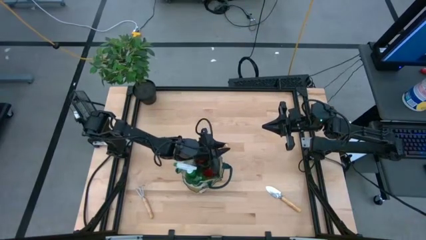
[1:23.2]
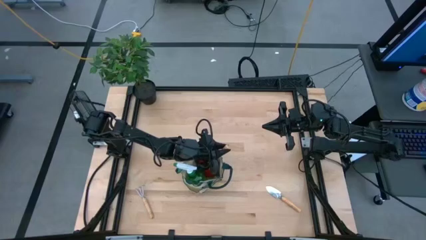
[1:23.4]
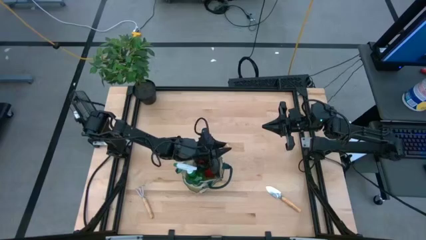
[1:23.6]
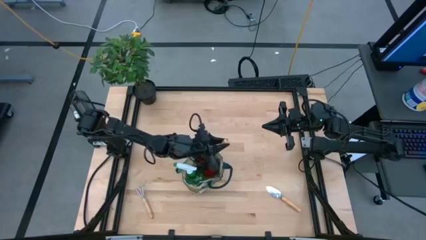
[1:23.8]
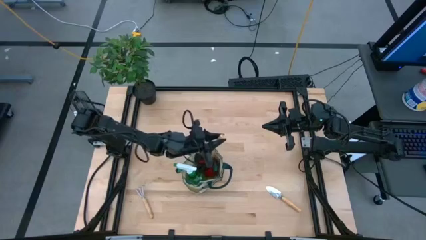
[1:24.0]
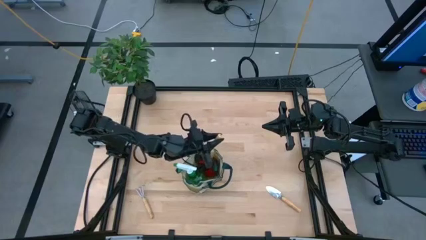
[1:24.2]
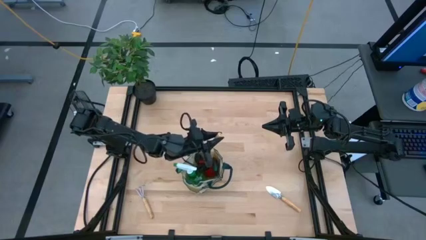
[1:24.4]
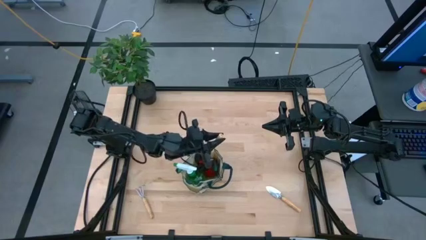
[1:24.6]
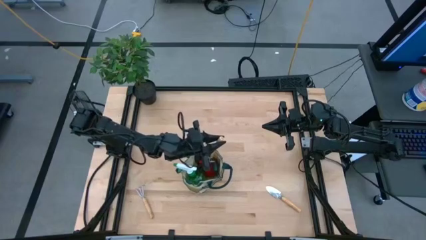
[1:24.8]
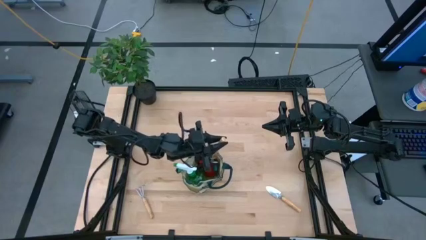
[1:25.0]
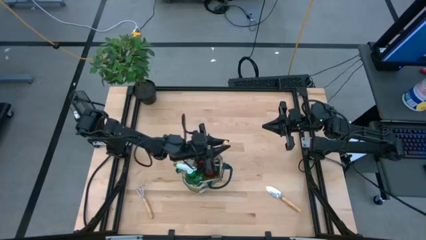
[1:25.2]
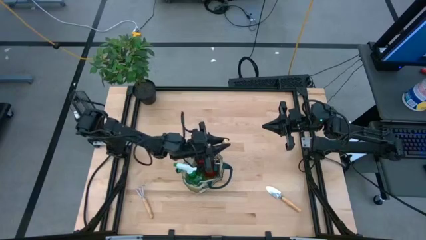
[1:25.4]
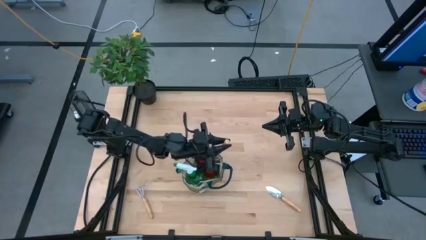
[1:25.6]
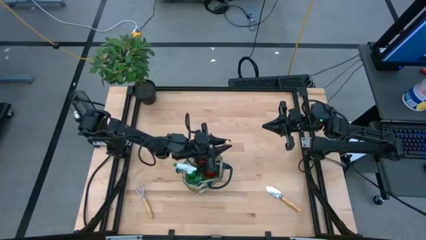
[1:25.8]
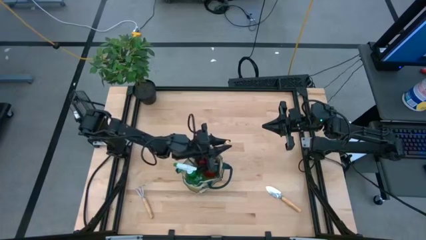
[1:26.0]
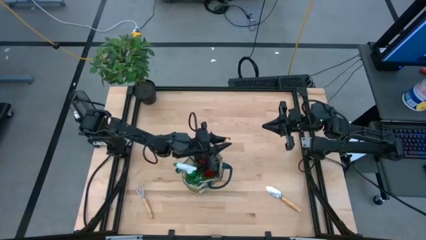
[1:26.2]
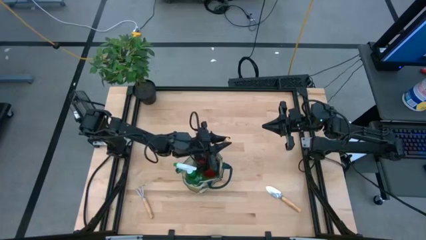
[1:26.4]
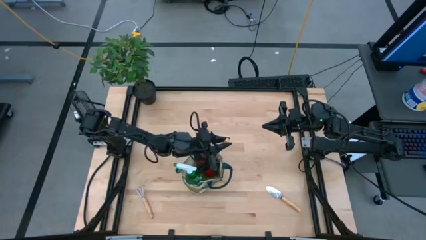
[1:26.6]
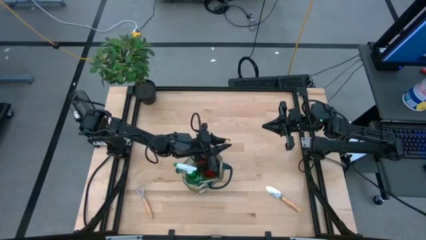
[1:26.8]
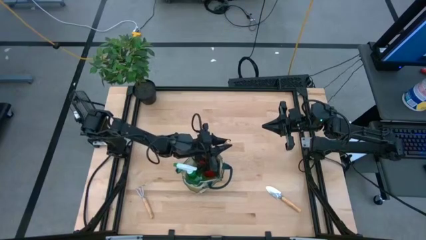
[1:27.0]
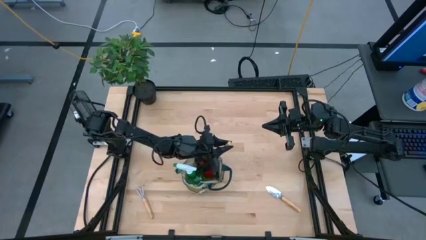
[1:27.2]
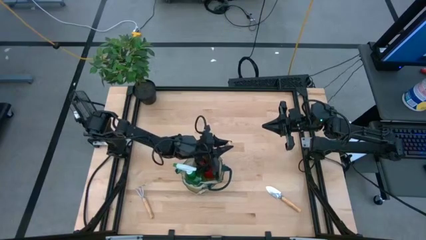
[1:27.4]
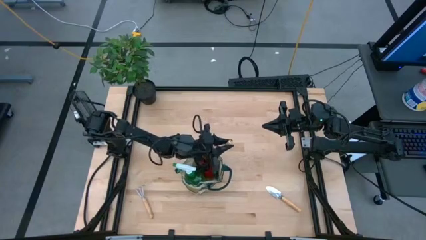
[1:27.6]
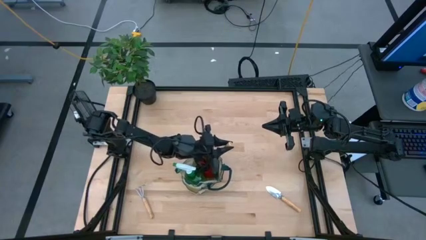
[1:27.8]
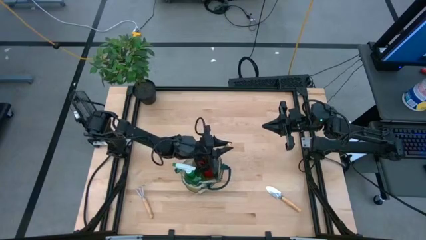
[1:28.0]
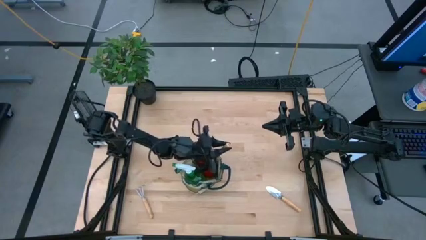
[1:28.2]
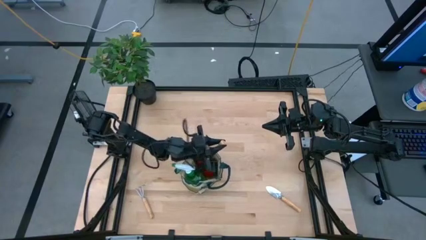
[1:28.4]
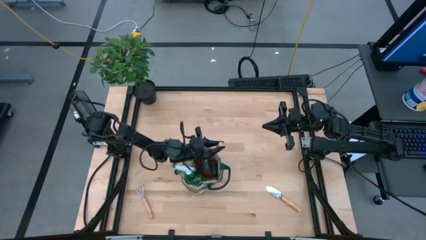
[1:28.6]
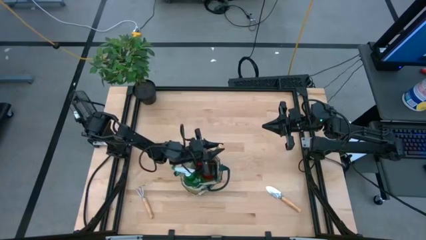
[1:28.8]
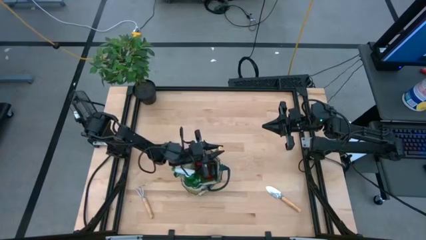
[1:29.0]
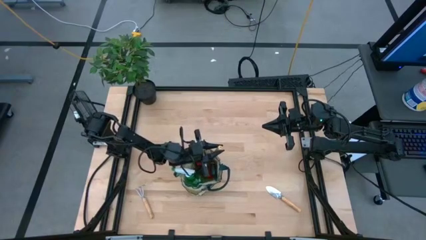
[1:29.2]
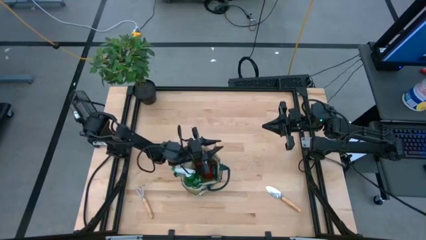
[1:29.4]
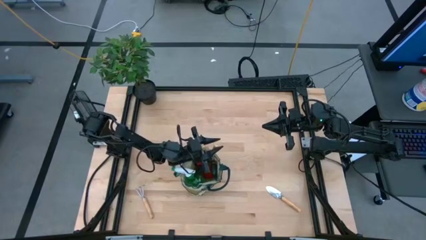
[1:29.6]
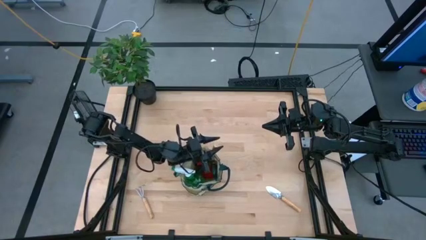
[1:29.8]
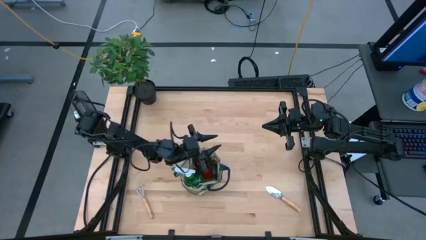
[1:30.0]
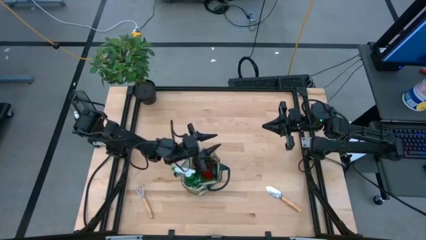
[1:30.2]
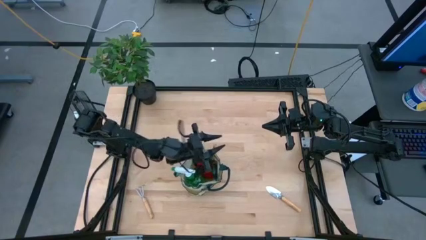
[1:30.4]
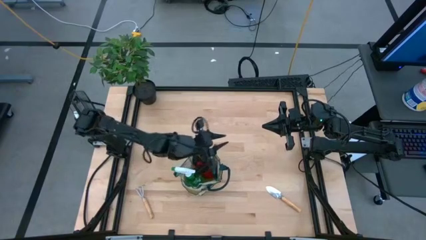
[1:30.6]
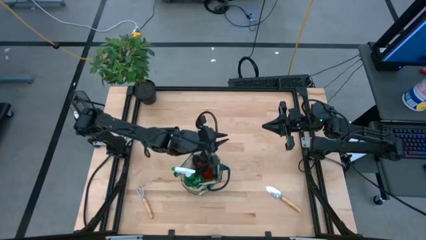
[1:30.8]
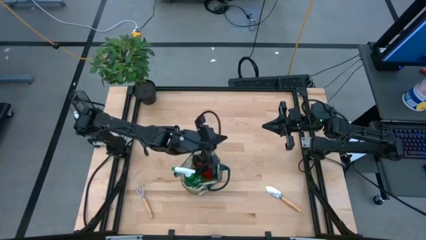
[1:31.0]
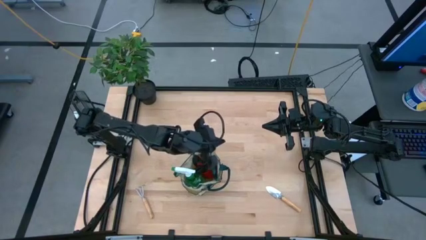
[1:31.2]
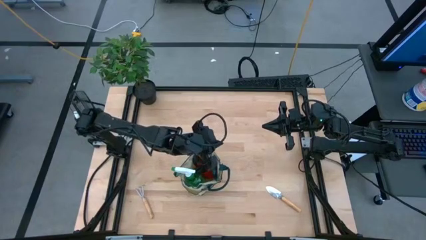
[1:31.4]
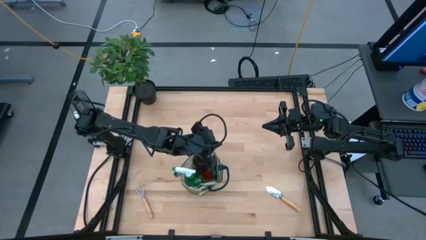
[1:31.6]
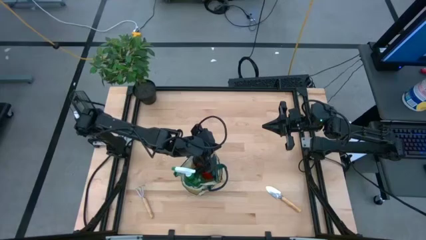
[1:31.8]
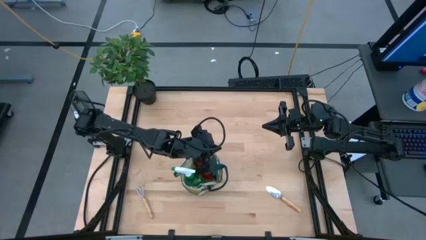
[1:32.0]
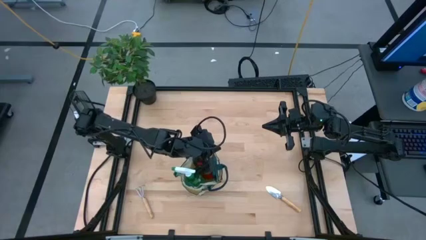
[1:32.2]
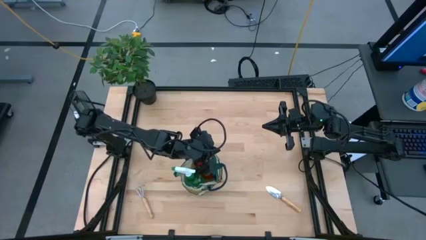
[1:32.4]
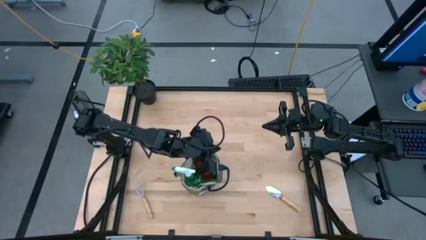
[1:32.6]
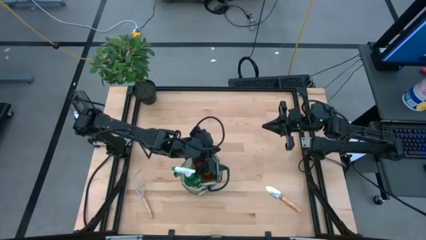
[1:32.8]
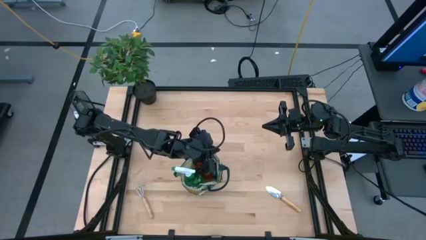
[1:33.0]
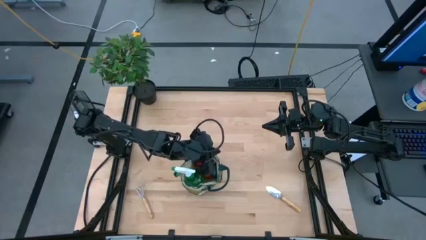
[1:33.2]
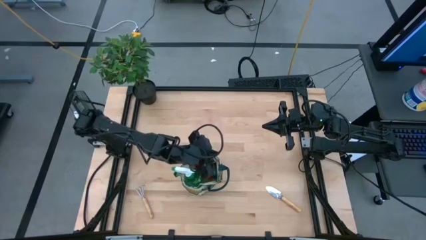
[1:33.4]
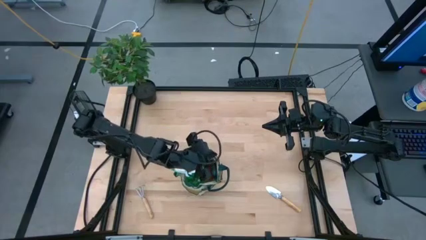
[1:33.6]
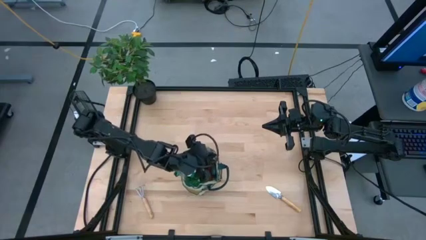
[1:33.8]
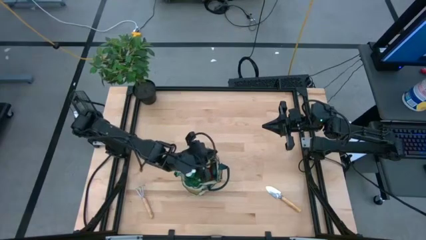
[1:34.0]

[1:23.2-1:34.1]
Task: Pick & Place Garden tools in Gardening bag
Put the top hand rake into the gardening bag

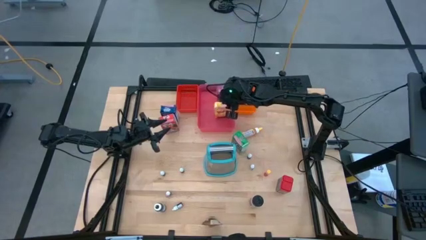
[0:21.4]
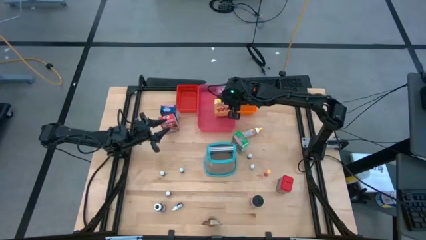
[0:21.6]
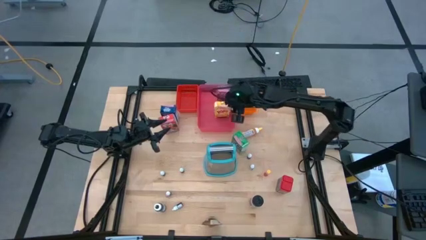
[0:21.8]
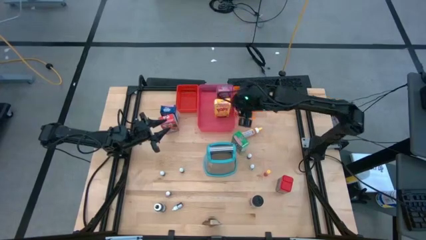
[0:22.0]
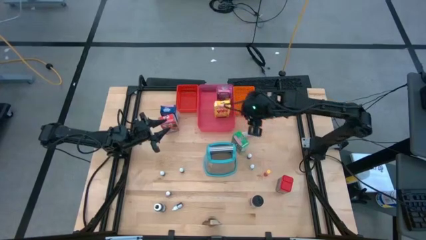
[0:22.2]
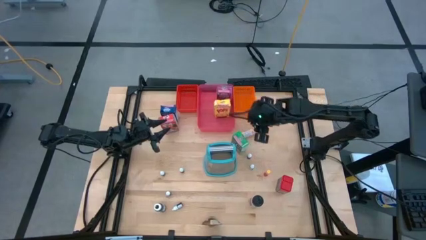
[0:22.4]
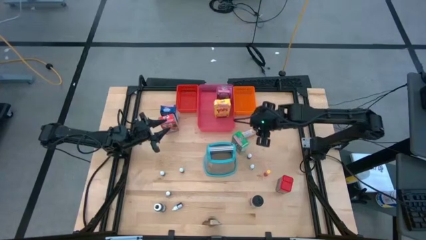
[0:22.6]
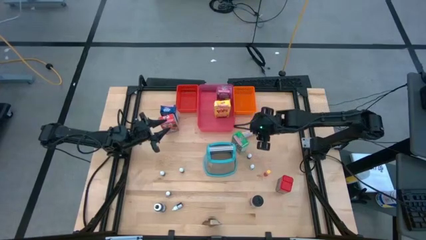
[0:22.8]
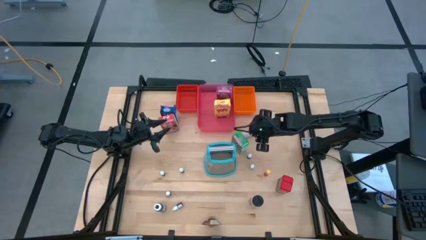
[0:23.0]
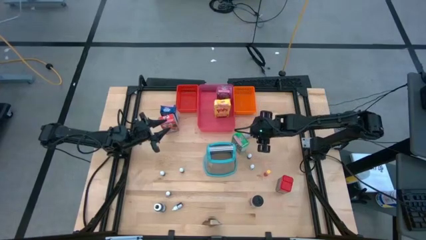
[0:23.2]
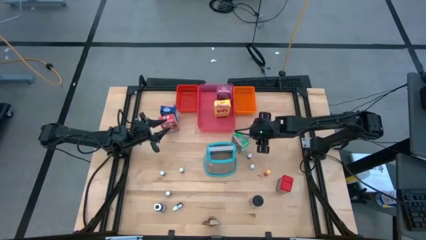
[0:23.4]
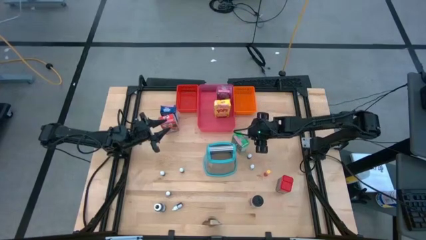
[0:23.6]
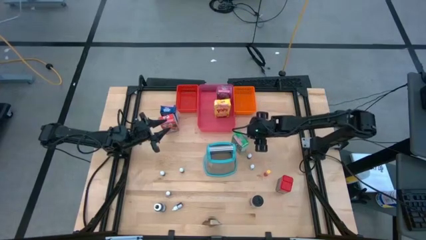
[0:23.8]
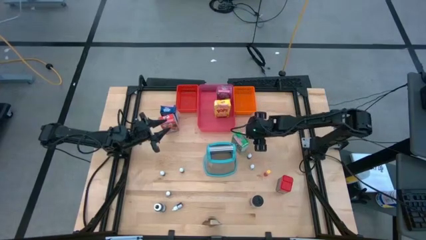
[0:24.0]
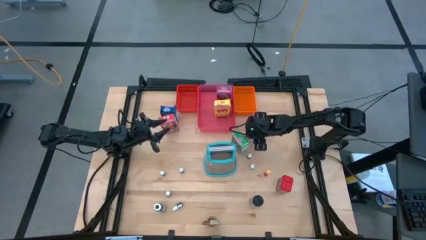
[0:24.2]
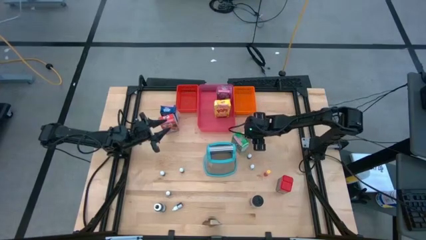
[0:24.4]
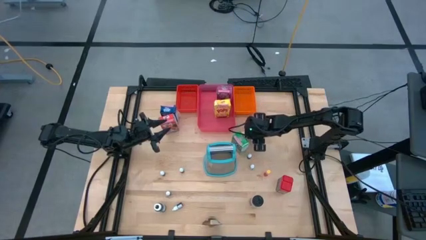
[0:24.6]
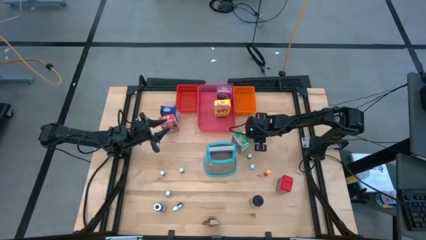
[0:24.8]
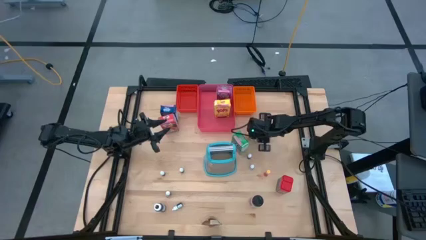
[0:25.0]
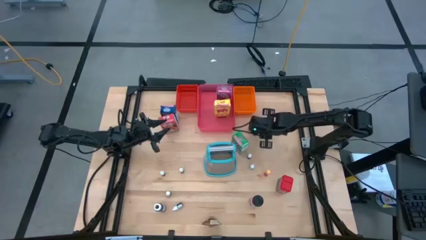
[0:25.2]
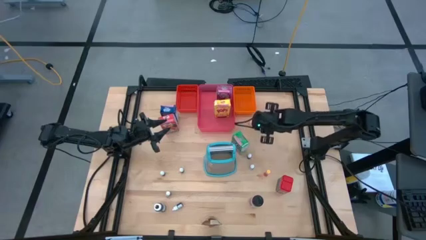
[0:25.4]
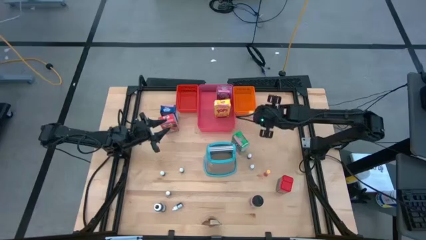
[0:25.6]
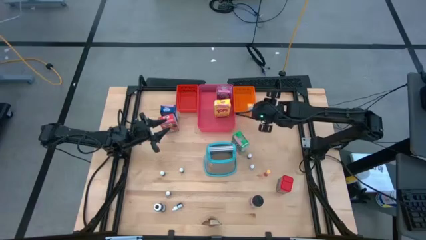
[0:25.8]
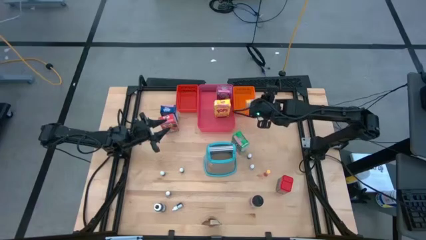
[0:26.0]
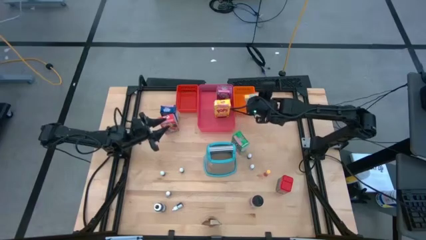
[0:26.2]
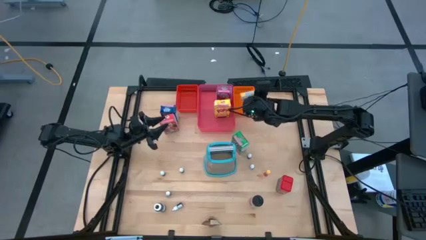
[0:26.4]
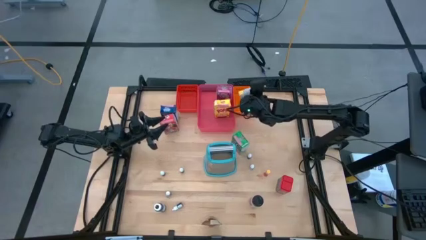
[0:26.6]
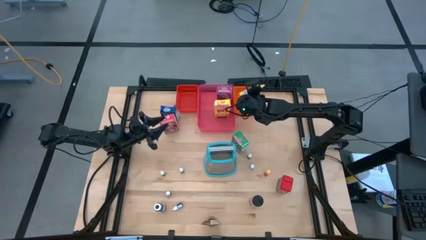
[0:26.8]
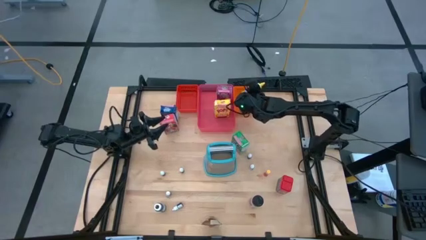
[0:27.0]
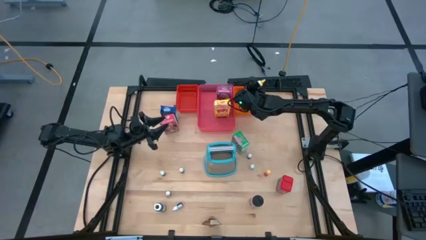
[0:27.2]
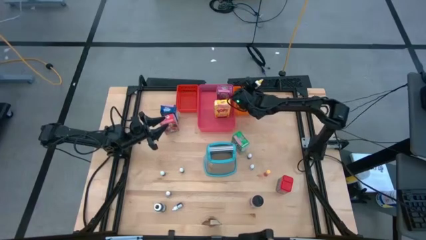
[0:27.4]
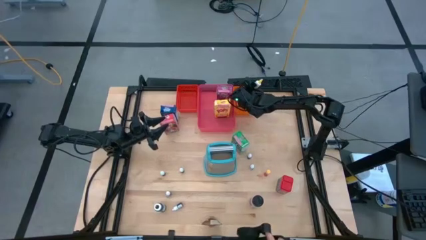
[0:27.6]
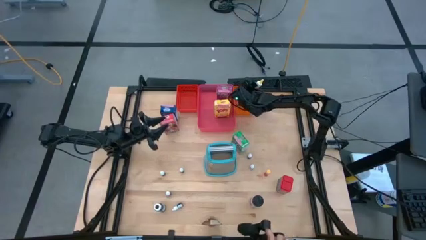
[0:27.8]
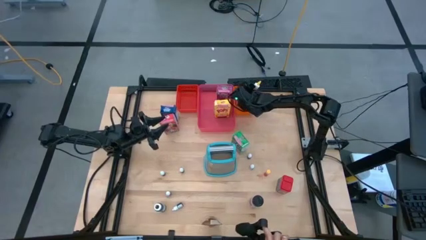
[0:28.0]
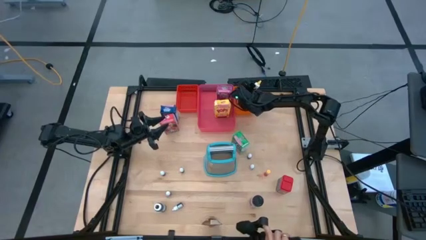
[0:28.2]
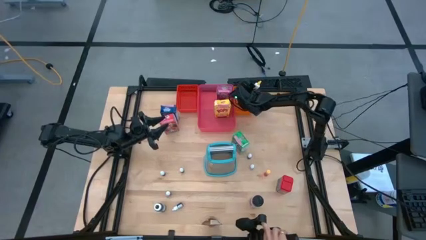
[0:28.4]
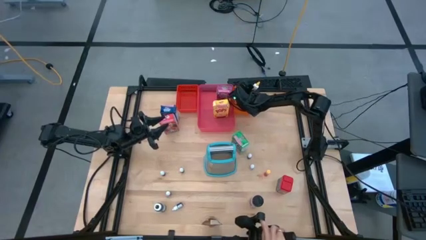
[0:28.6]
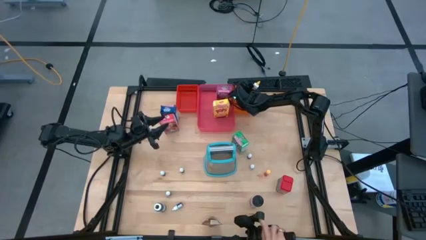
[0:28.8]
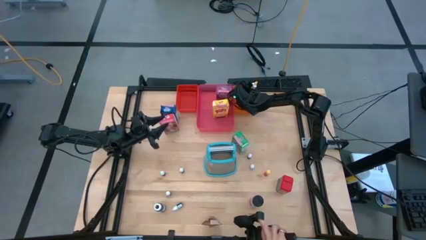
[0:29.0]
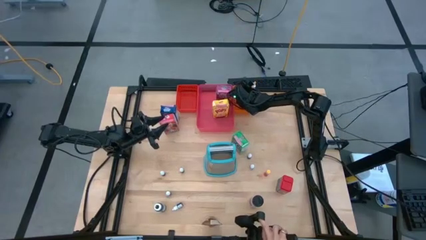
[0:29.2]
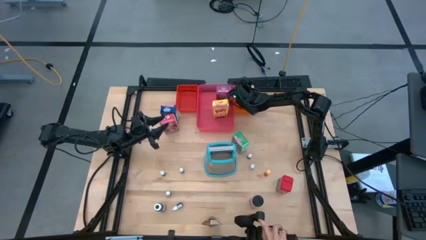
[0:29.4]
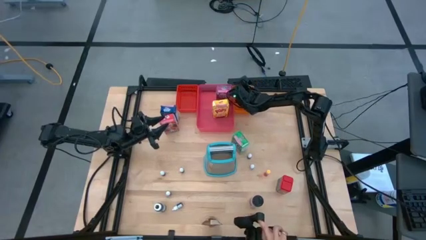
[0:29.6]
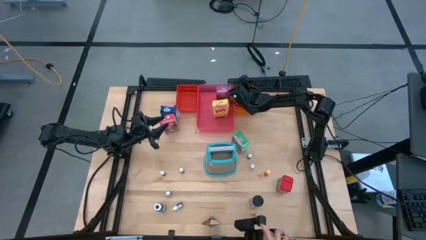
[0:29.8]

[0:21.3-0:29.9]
Task: Pick & Place Kitchen Items
Put the large yellow food coloring bottle into the orange bin
